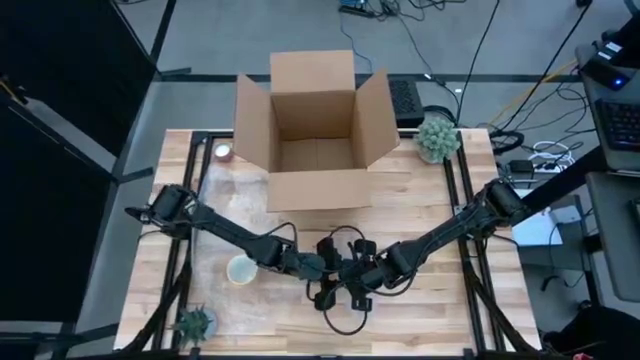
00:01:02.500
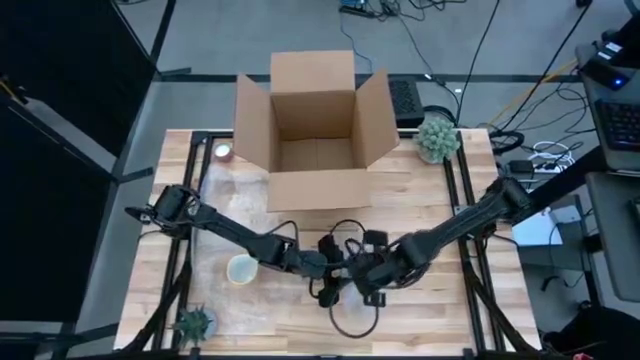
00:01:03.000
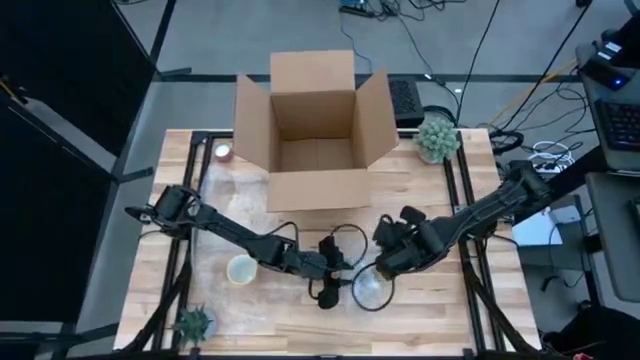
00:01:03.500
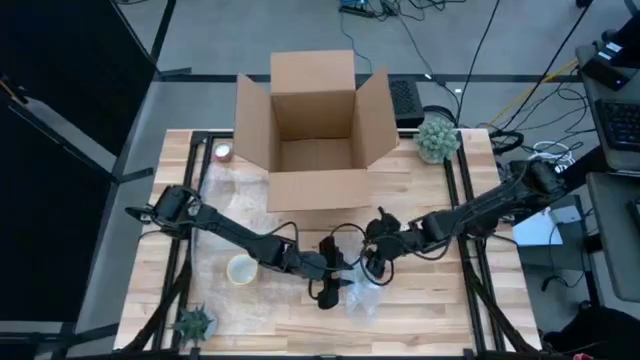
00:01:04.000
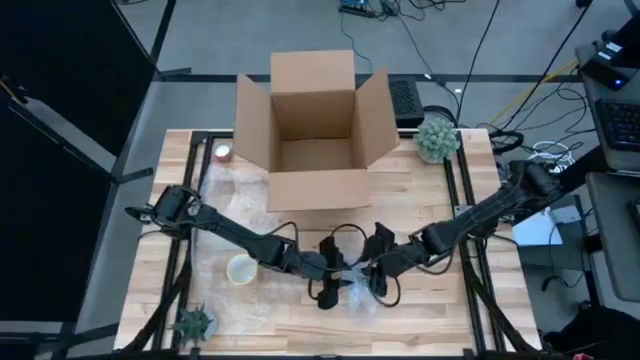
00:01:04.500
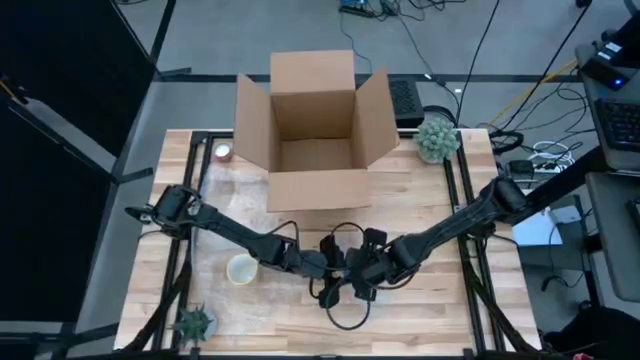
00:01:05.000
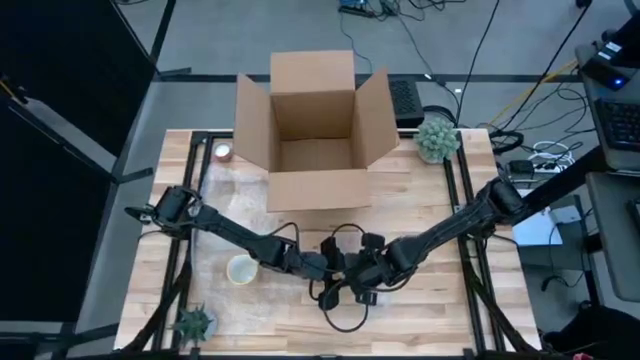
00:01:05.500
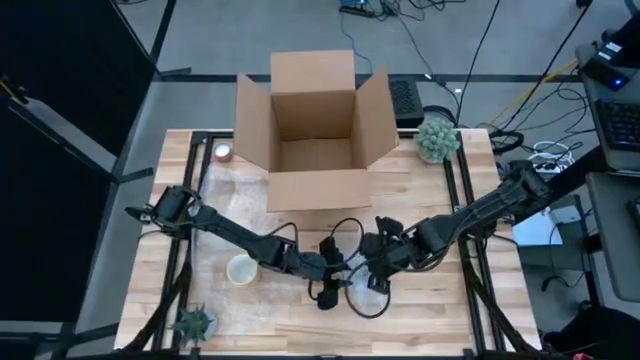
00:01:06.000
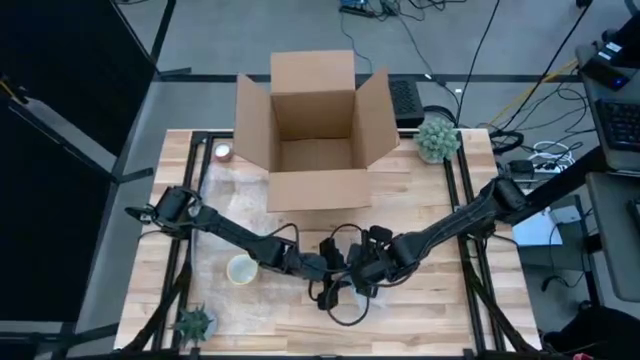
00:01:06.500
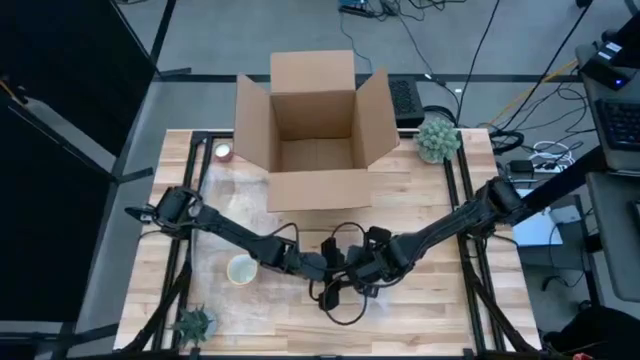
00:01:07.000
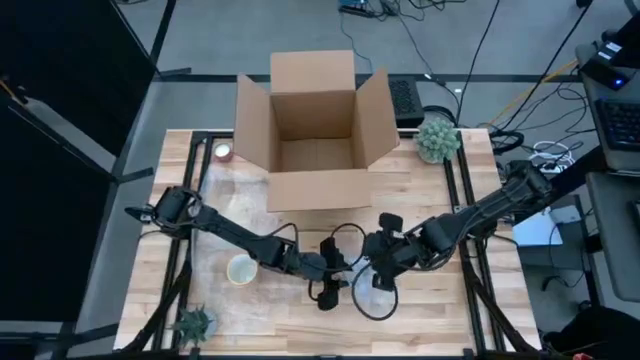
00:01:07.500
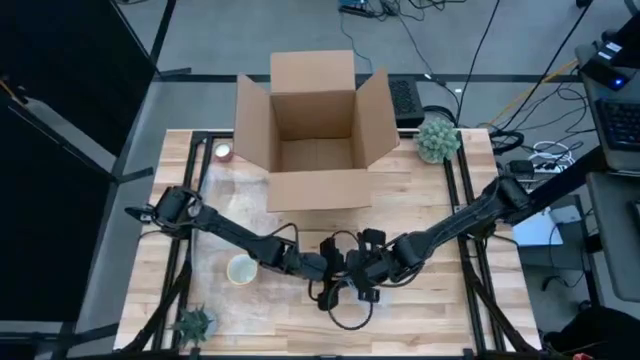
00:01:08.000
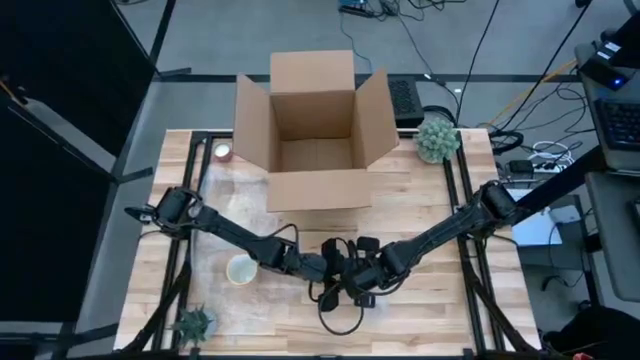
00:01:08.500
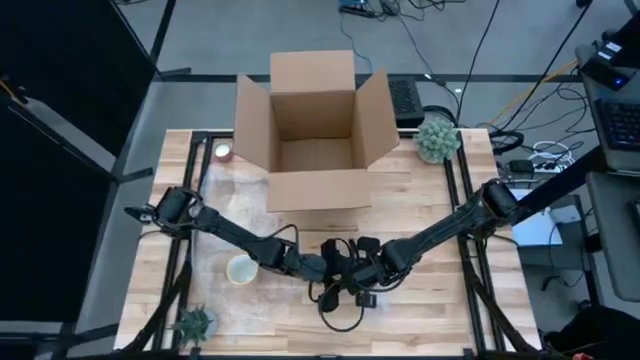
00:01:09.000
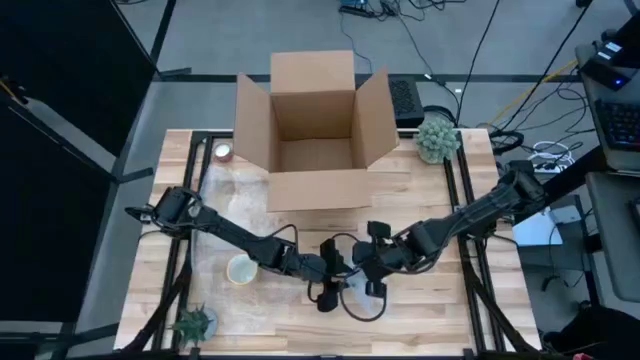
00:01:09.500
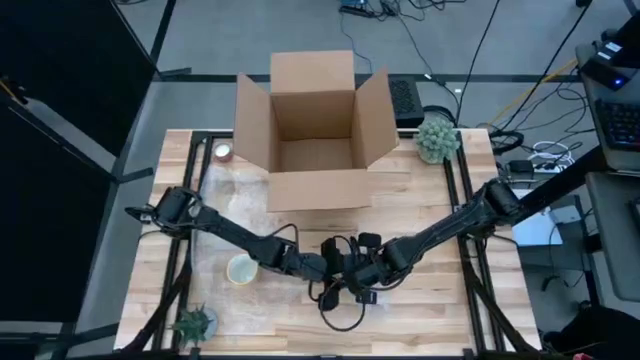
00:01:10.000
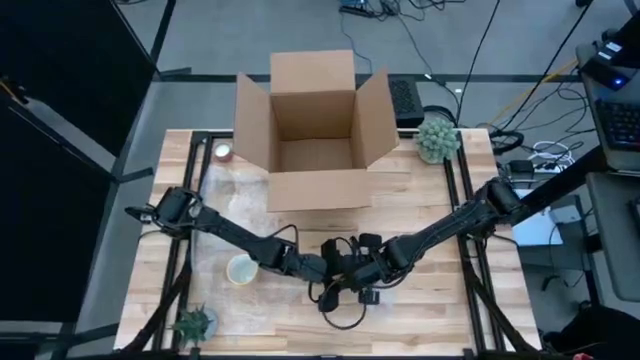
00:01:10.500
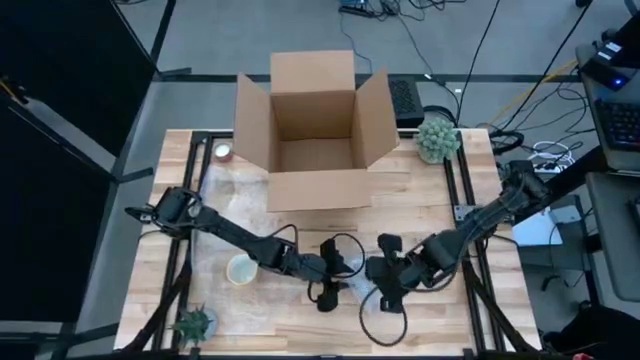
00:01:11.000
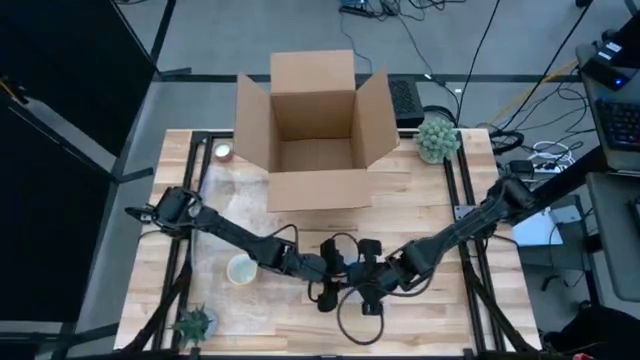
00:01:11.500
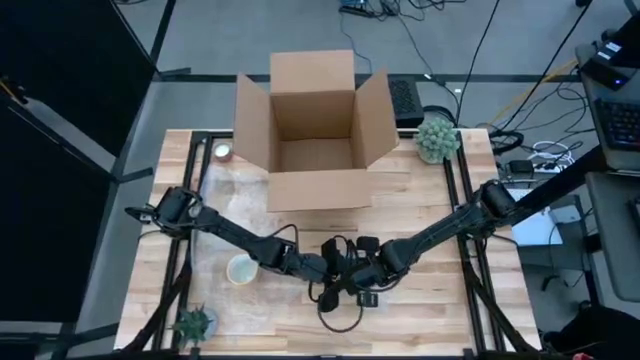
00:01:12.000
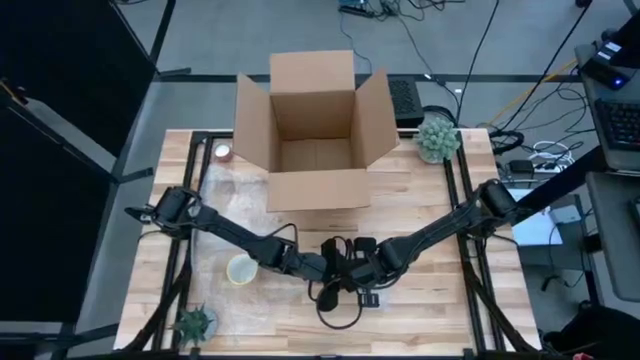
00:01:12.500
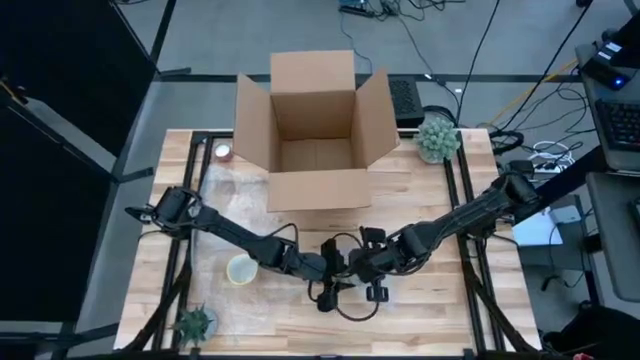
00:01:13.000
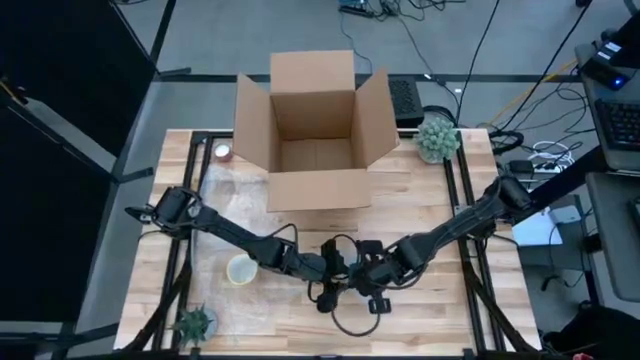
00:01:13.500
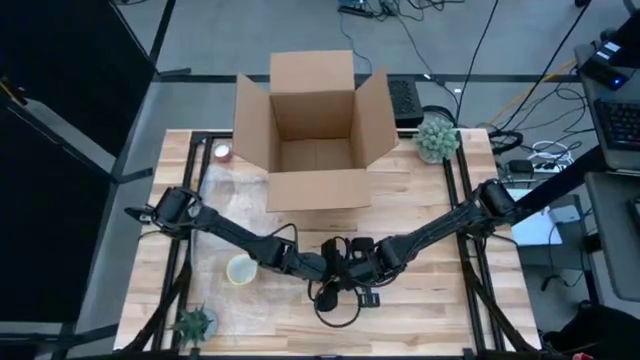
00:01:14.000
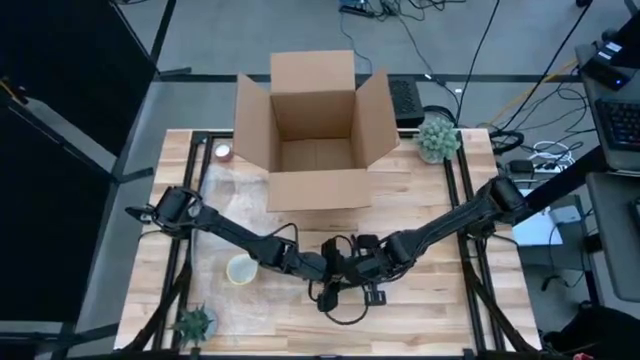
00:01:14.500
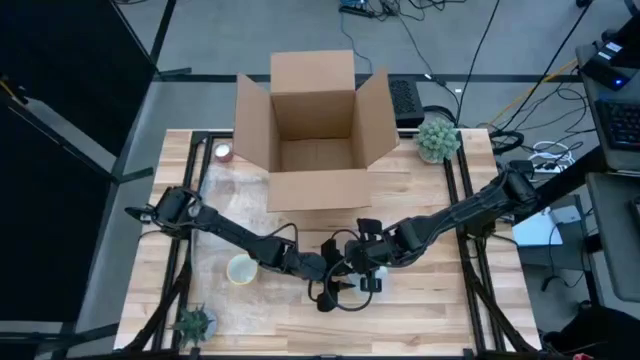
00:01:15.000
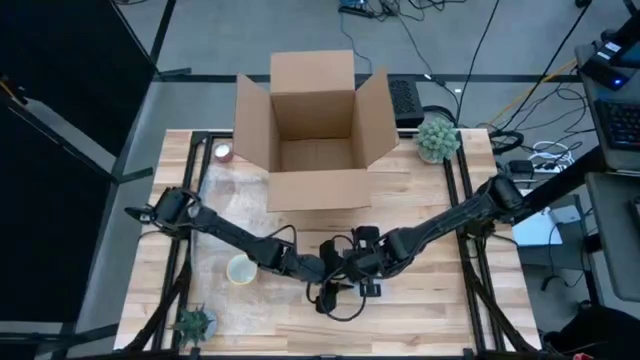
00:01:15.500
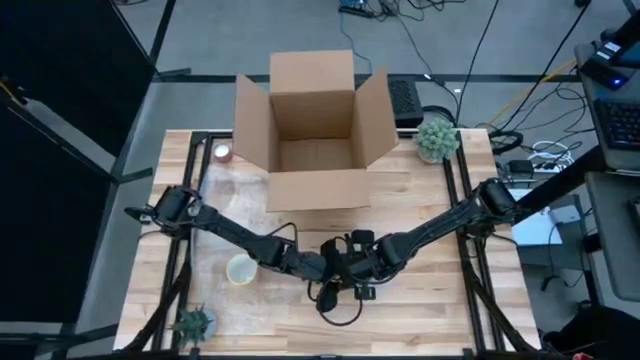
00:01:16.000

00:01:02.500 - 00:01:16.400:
Task: wrap mug
Wrap the red mug with the bubble wrap

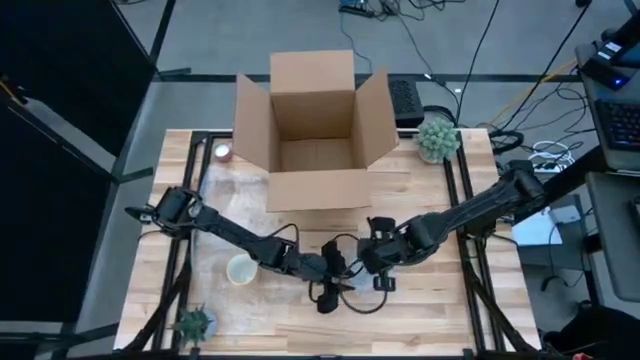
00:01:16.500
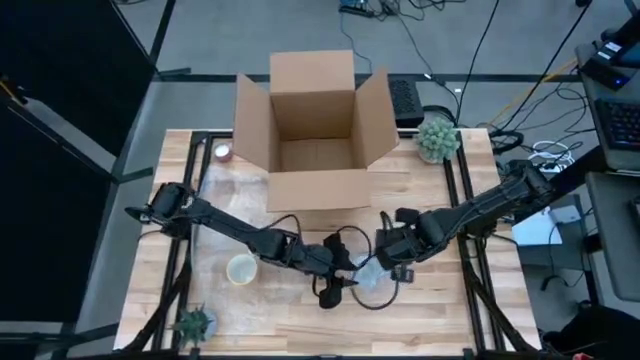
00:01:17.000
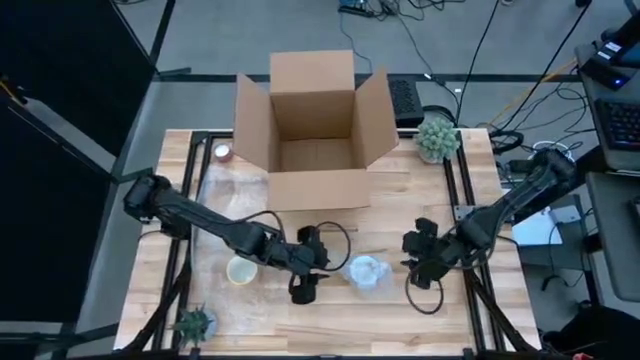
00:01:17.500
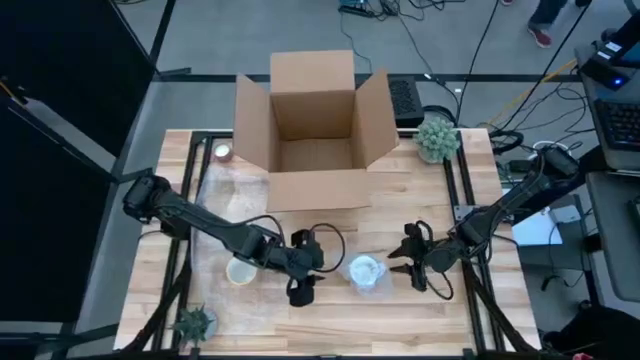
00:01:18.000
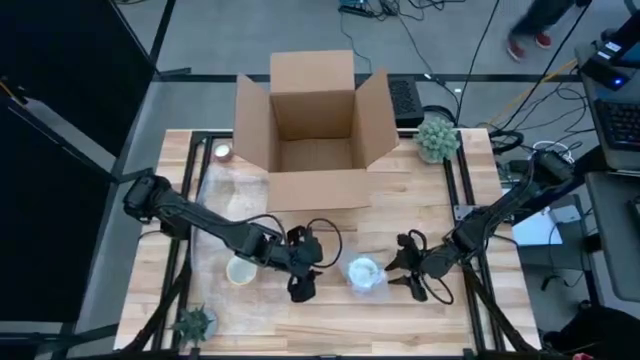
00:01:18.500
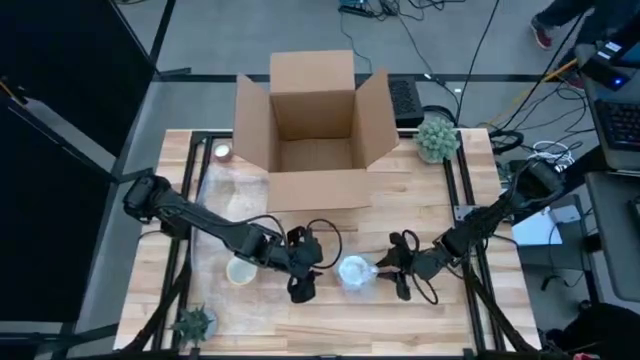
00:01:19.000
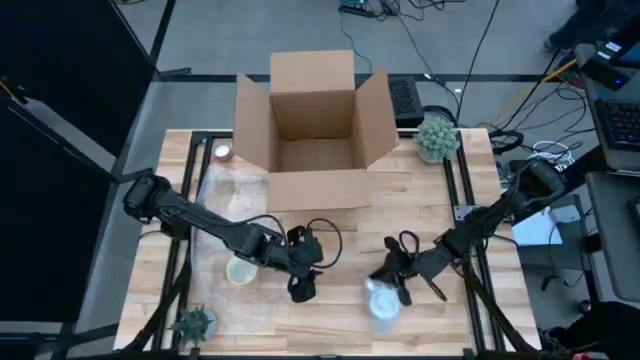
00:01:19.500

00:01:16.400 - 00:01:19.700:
Put the wrapped red mug into the box

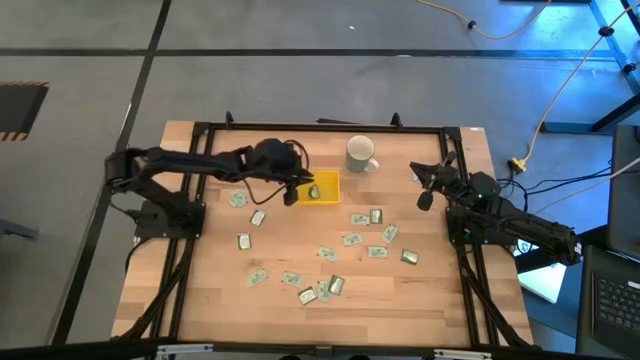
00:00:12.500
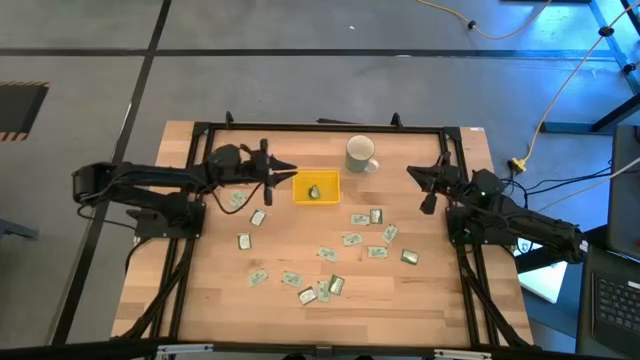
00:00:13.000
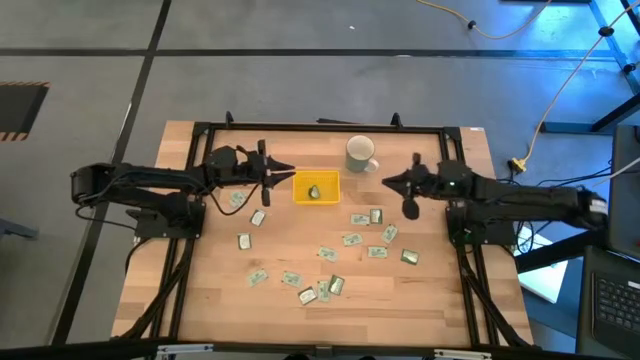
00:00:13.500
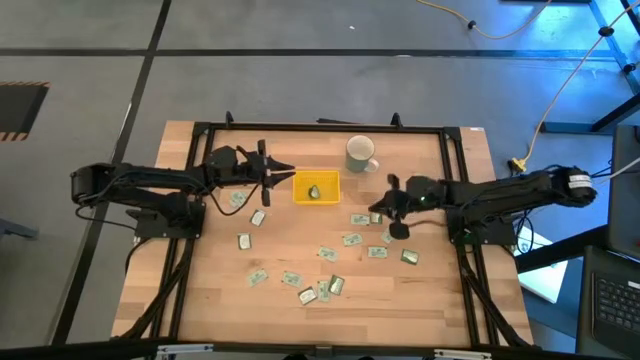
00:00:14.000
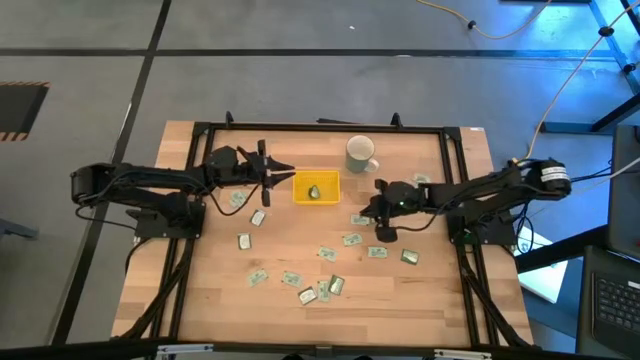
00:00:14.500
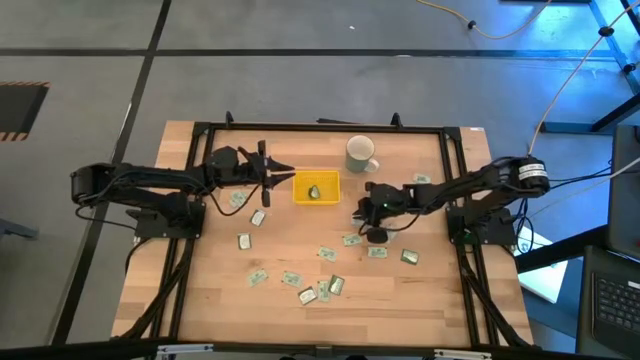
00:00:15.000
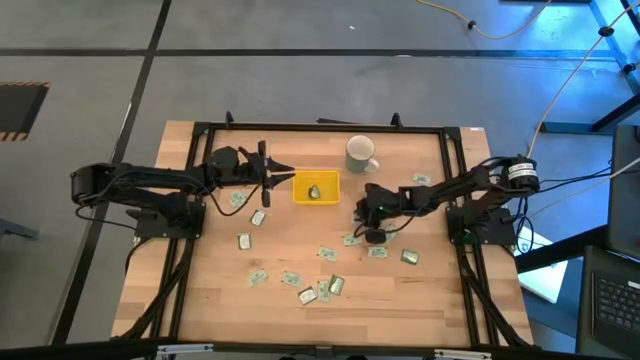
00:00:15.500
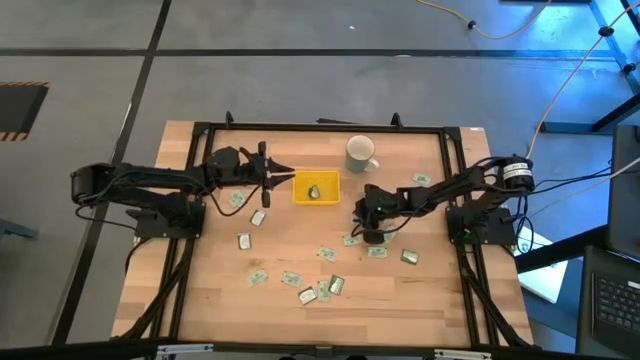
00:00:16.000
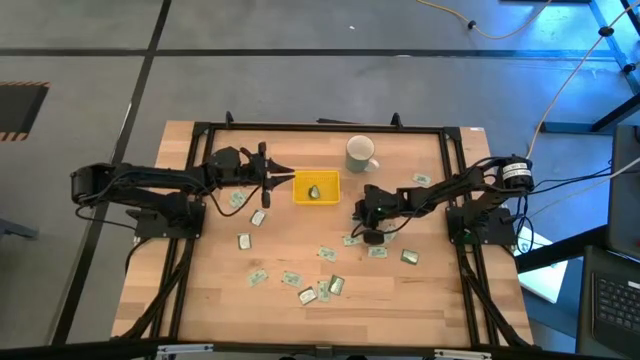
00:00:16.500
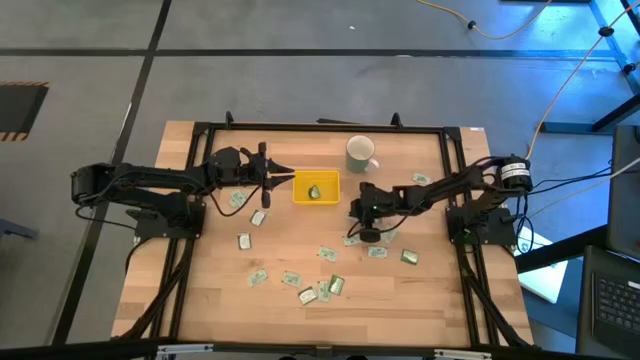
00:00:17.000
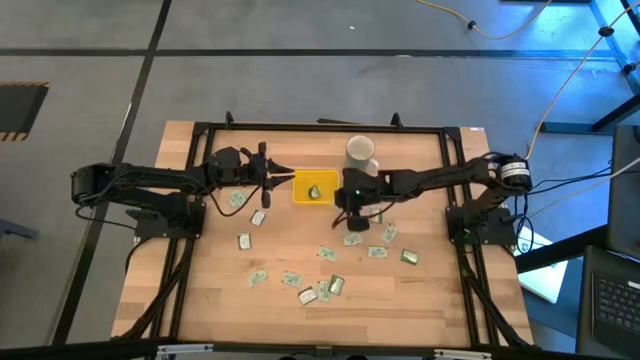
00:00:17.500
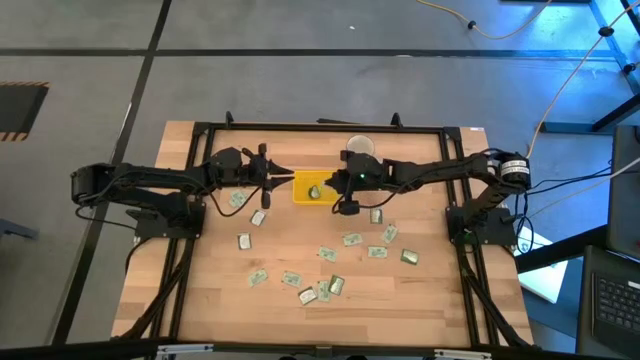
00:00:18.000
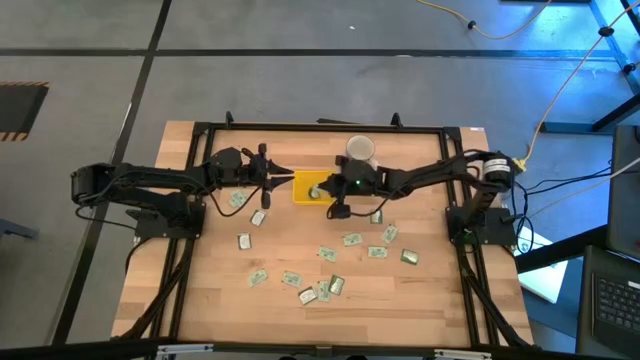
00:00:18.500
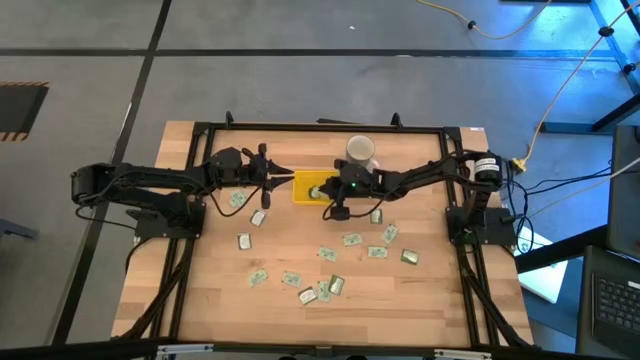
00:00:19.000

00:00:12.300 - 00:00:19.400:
Task: Pick and place Stevia / Truvia into bins
Put the middle right stevia tea packet into the yellow bin
